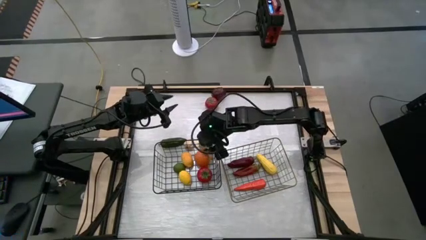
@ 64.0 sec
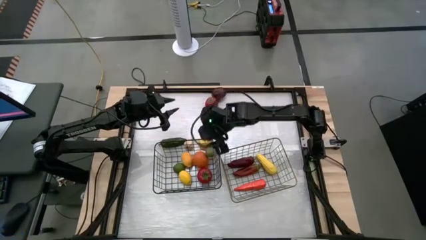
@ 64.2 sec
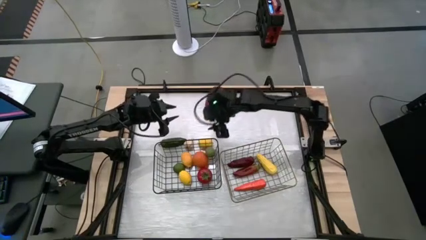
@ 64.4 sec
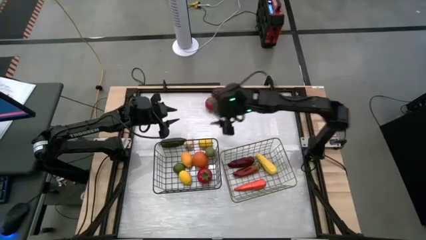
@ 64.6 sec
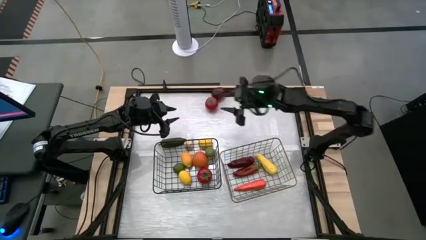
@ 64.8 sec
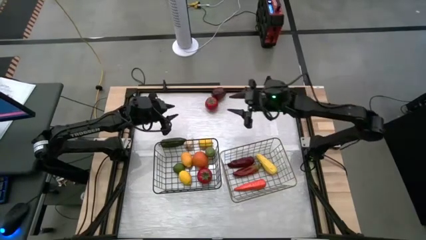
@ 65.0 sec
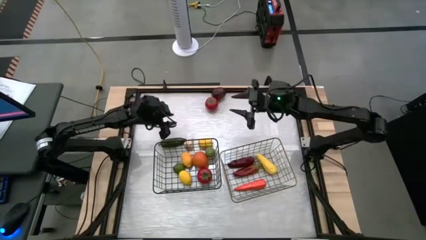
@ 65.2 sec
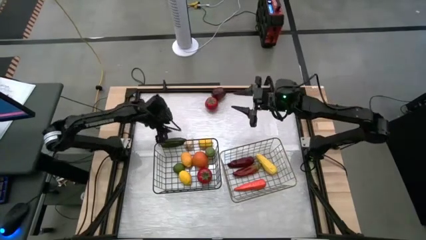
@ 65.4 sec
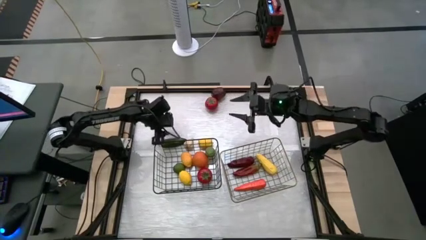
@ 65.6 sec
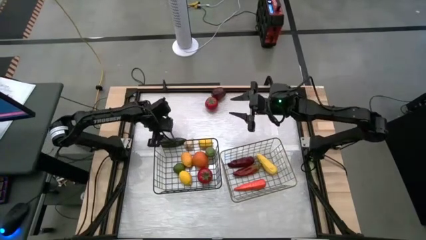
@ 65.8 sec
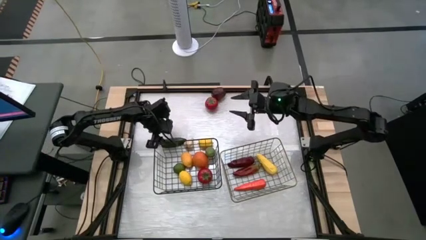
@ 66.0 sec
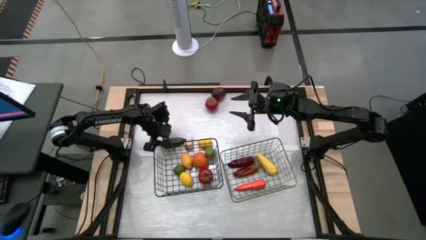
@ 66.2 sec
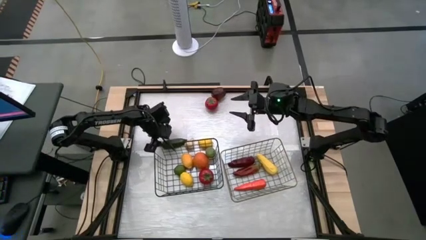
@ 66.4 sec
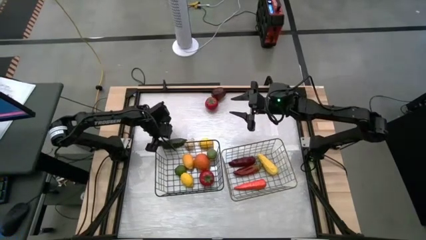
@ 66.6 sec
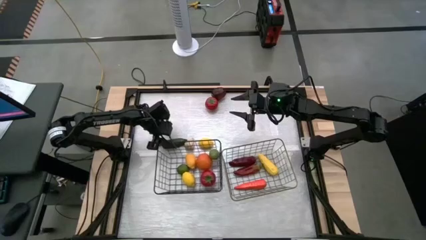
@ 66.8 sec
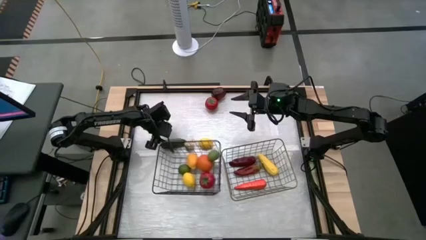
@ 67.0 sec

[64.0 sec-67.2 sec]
Task: Sort produce into baskets
Put the green bell pepper into the gold wire basket

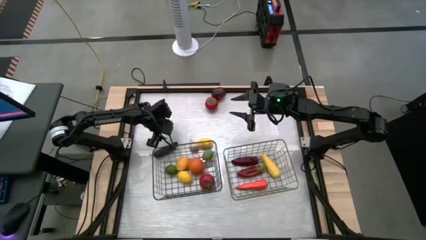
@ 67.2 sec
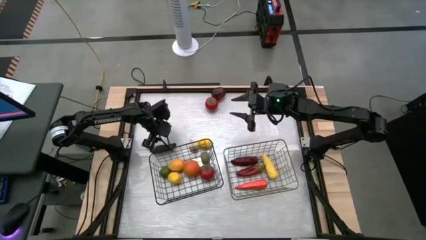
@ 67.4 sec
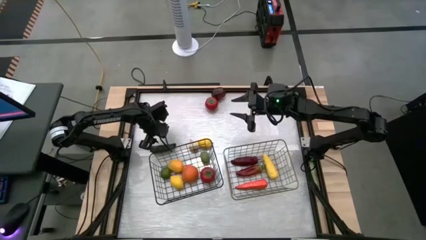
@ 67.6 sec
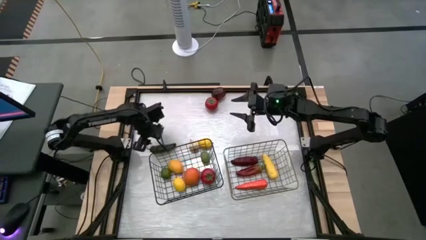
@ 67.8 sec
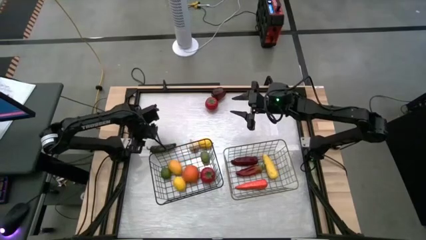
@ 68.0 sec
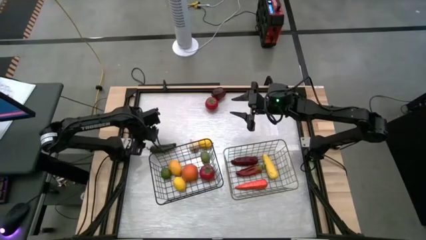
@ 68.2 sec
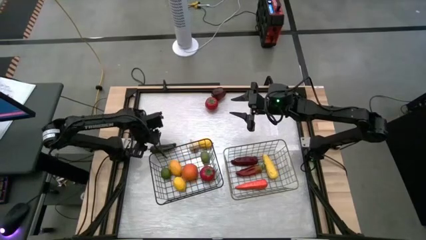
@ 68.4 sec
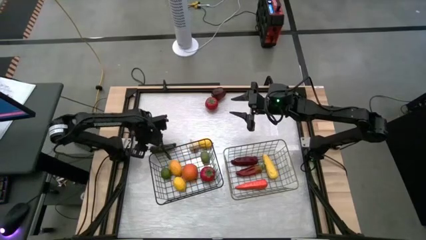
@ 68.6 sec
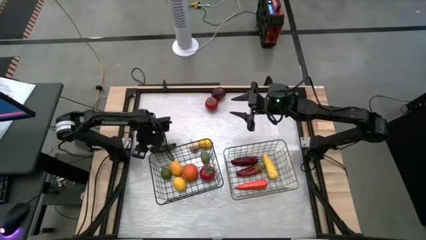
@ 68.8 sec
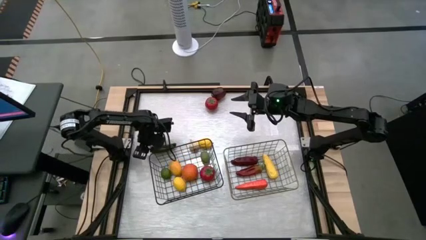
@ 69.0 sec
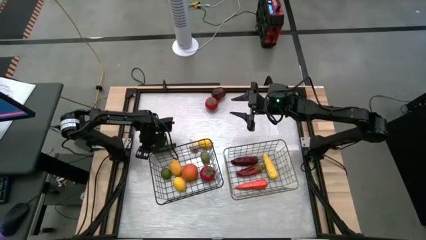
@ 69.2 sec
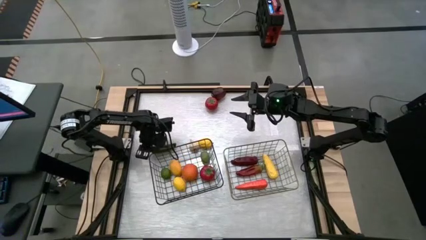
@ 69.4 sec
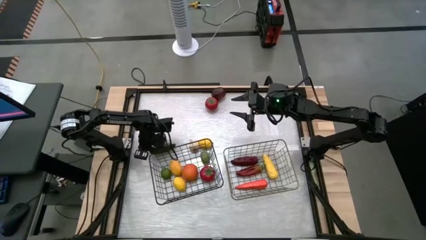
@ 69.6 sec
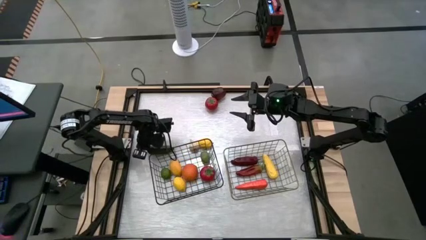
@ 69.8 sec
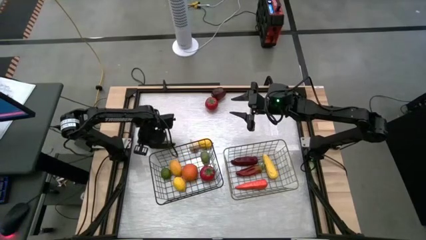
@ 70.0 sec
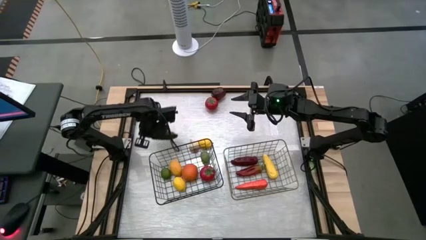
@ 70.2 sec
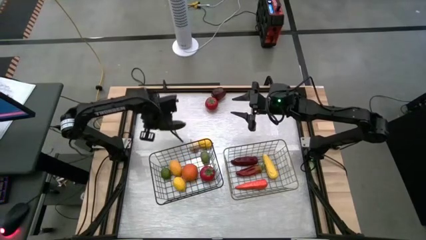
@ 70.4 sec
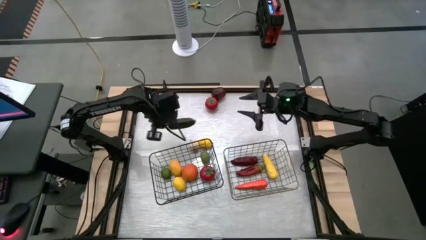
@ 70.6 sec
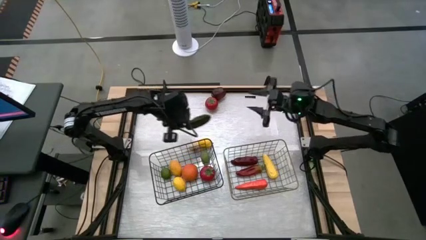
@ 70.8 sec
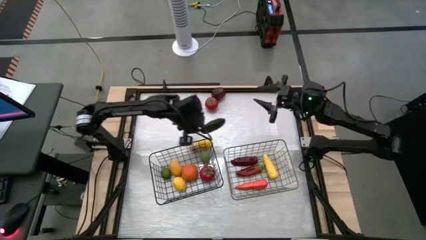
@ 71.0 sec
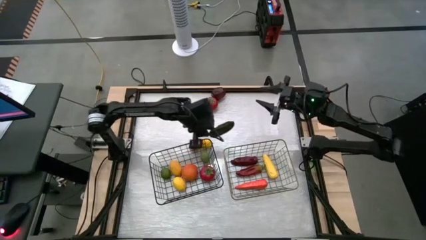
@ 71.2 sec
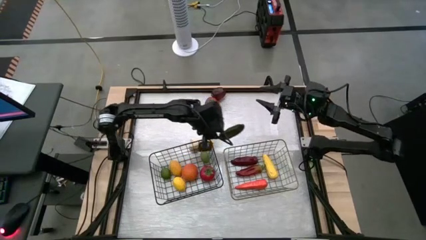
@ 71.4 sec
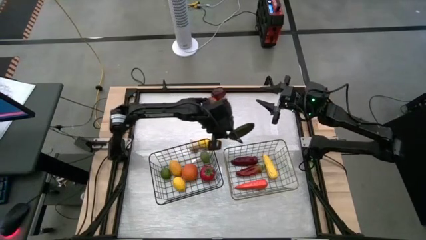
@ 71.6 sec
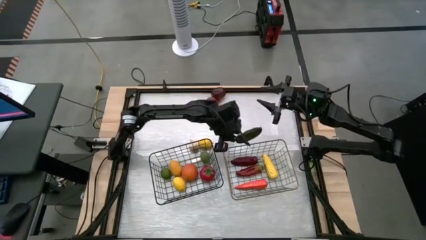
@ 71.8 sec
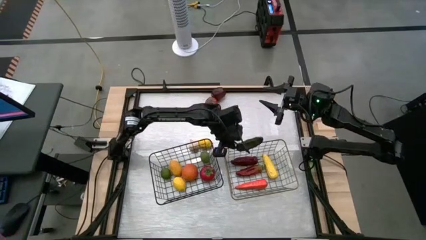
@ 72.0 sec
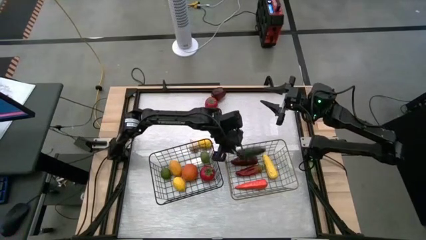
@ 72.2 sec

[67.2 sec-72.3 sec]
Put the green bell pepper into the gold wire basket

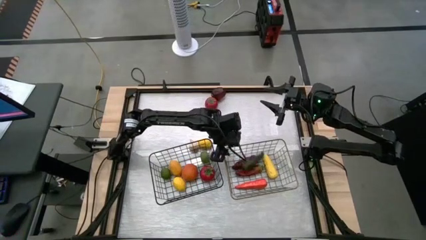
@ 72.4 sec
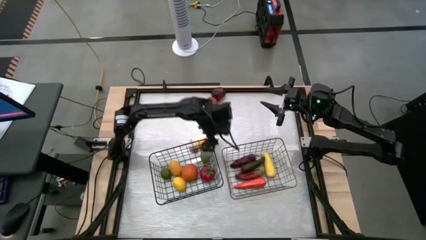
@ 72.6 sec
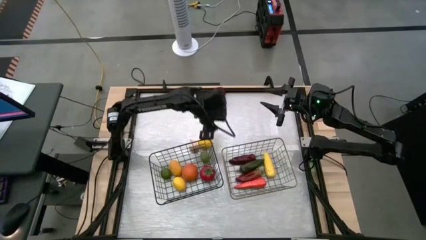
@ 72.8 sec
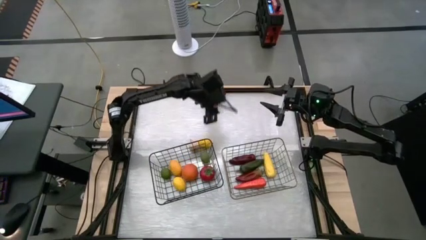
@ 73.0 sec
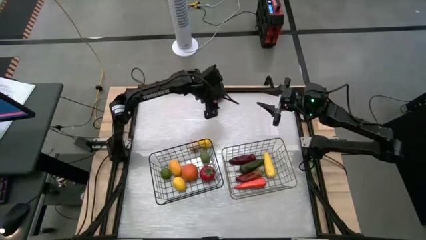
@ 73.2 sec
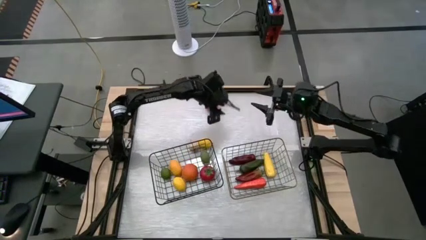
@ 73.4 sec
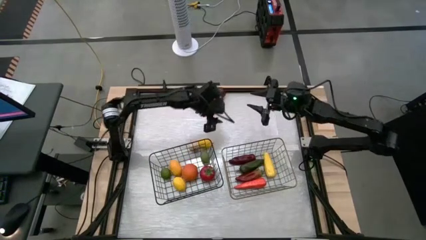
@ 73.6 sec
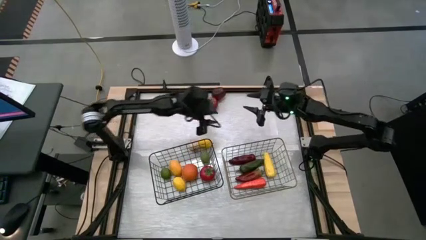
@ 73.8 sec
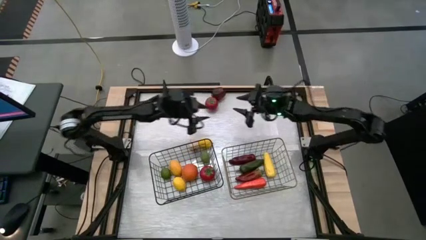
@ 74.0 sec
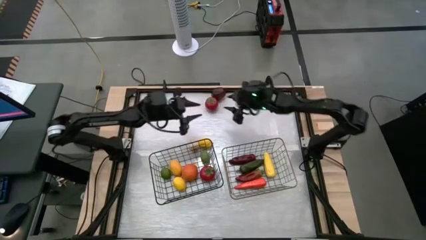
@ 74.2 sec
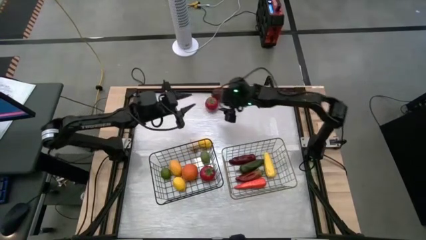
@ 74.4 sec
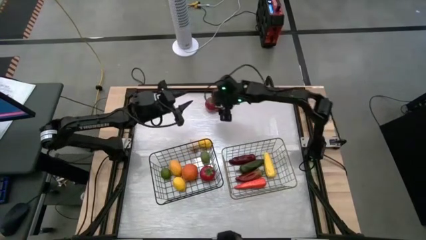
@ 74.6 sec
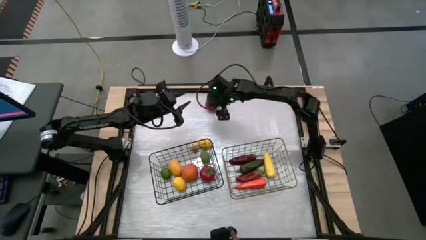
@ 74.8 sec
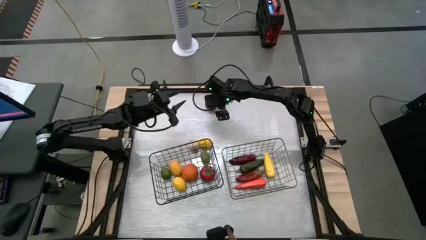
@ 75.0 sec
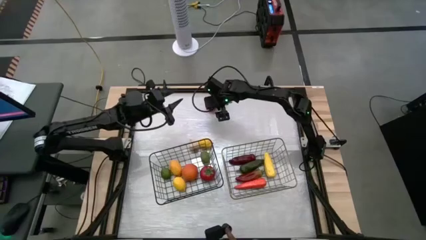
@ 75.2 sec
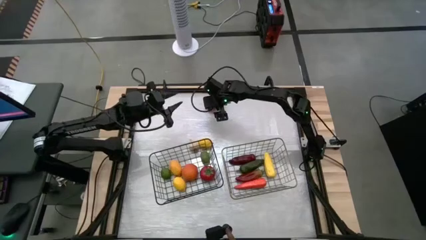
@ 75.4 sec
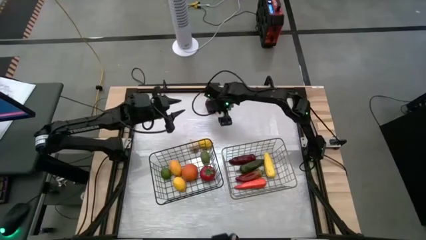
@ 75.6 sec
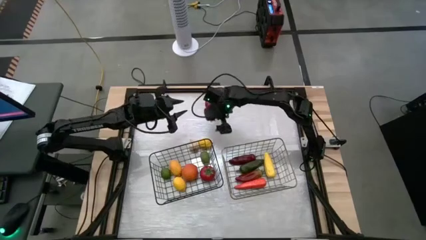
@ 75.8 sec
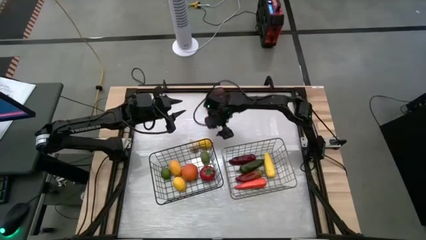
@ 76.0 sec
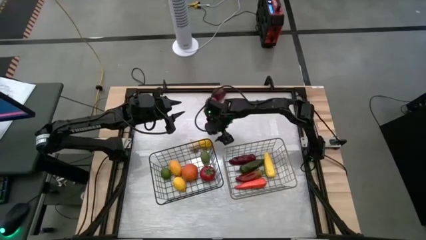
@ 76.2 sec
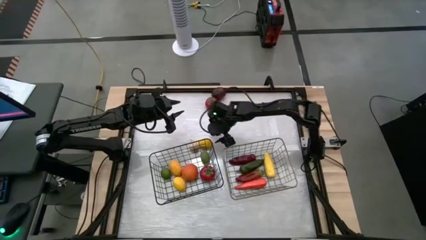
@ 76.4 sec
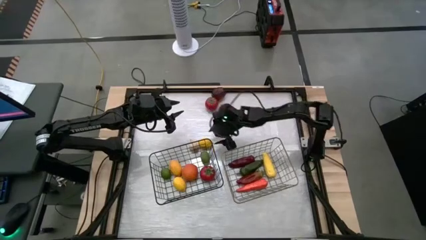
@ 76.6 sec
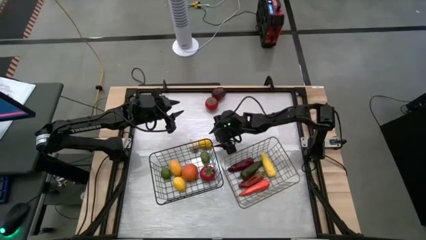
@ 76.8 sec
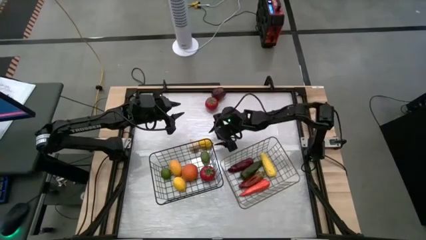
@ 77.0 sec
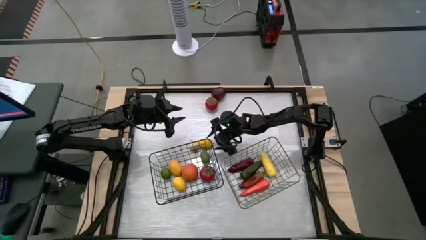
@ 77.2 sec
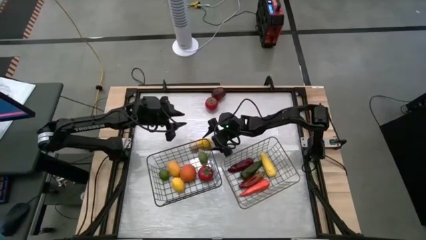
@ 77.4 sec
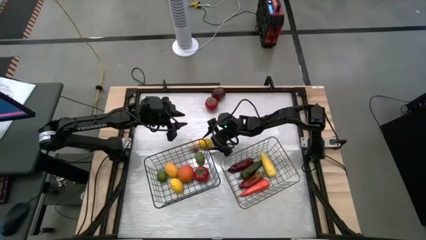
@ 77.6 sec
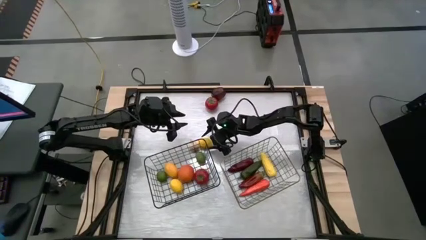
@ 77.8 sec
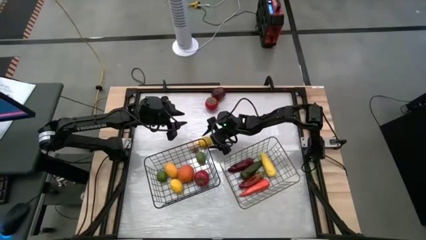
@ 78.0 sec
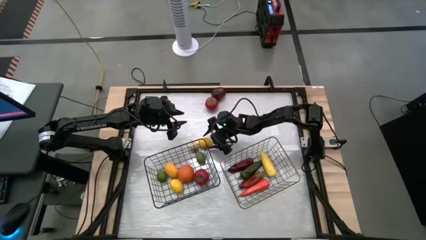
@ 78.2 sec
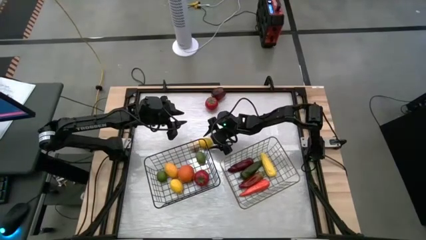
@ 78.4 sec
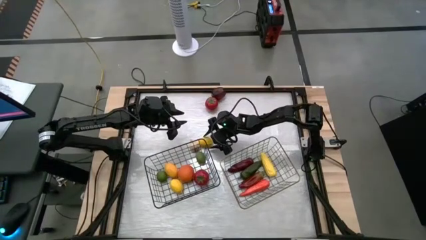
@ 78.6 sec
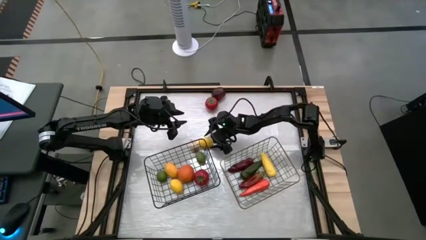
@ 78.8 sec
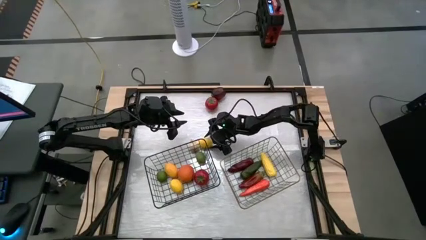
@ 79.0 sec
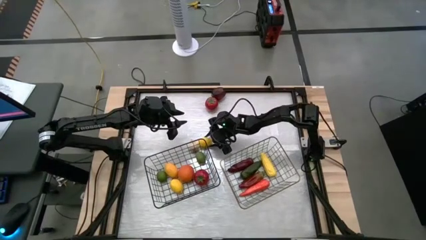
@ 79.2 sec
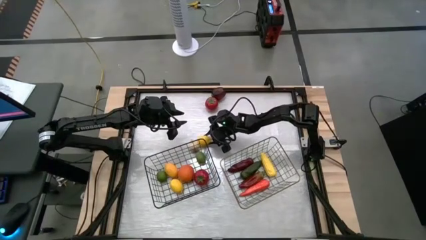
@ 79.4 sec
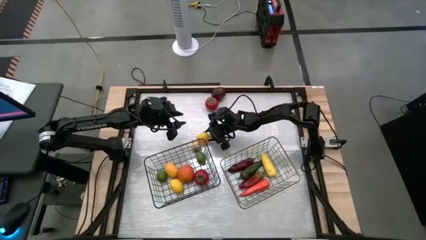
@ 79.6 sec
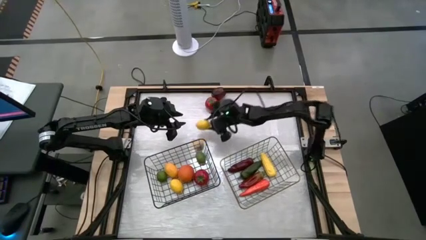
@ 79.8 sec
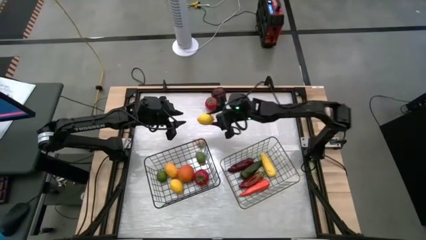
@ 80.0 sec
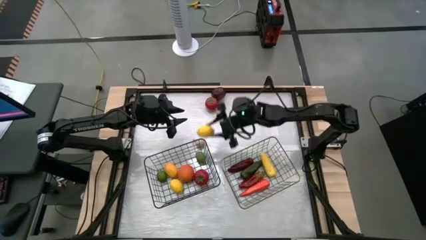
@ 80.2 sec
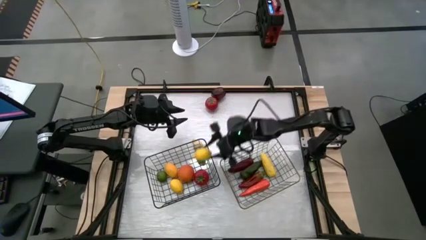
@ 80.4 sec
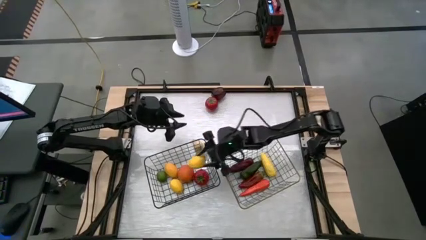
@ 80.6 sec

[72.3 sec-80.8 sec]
Put the yellow lemon into the black wire basket
